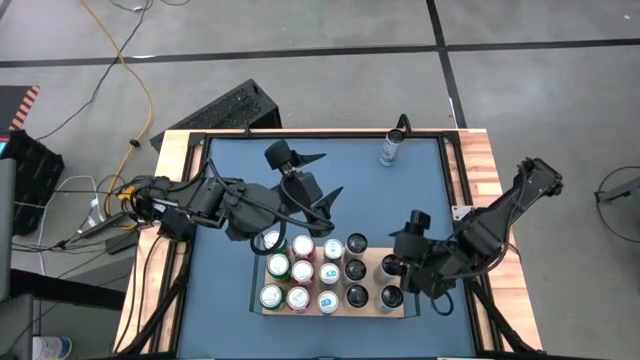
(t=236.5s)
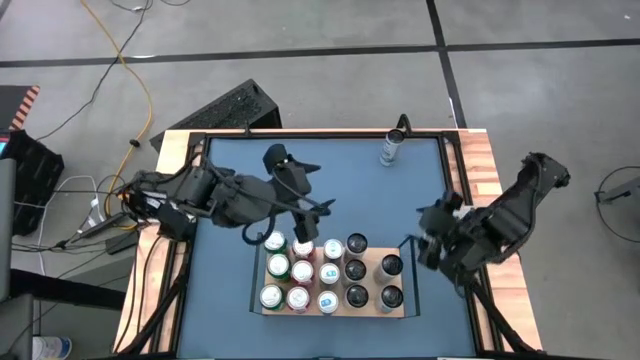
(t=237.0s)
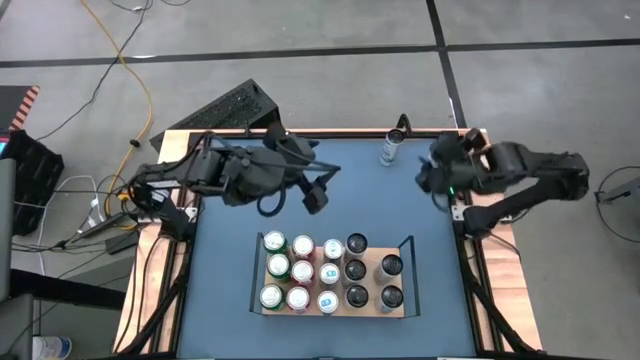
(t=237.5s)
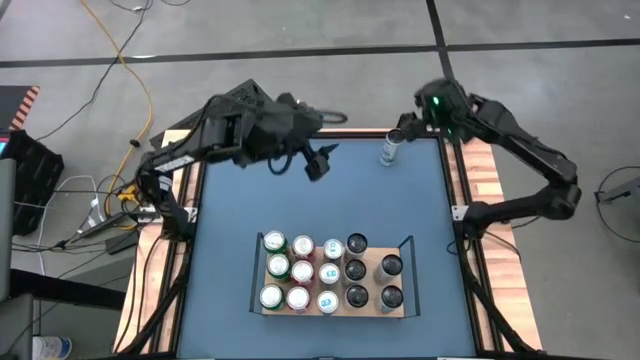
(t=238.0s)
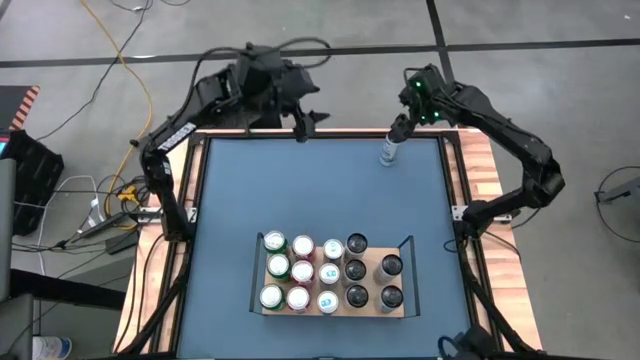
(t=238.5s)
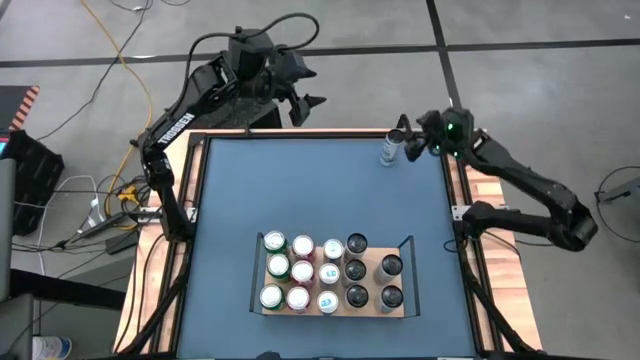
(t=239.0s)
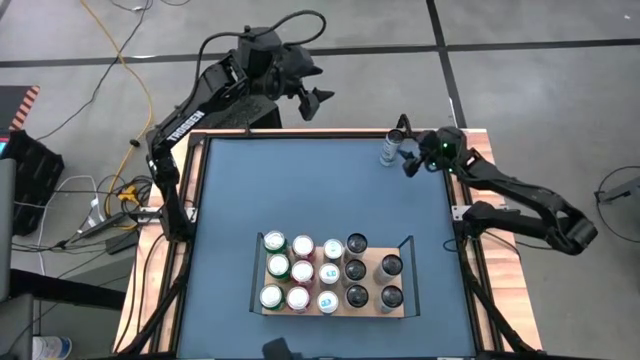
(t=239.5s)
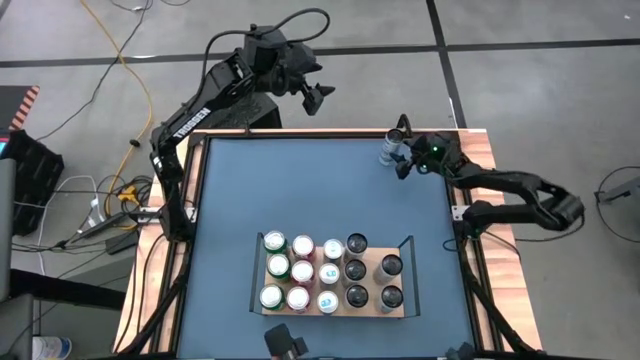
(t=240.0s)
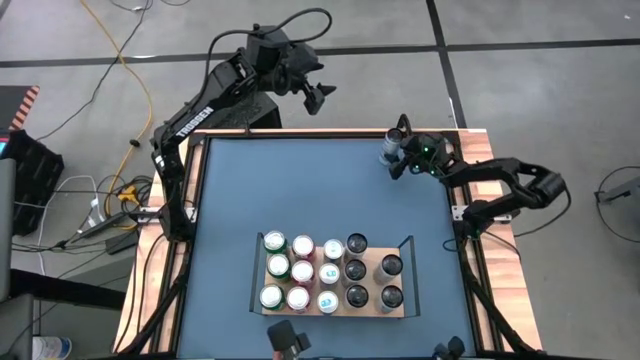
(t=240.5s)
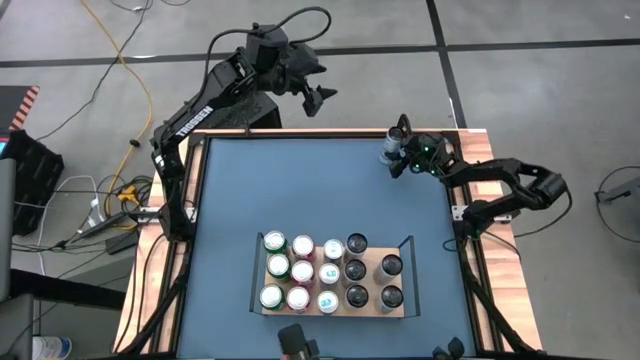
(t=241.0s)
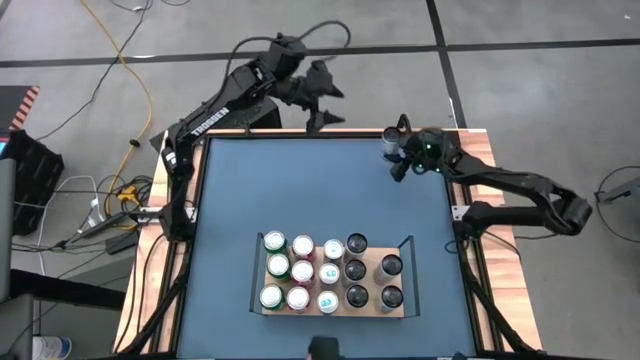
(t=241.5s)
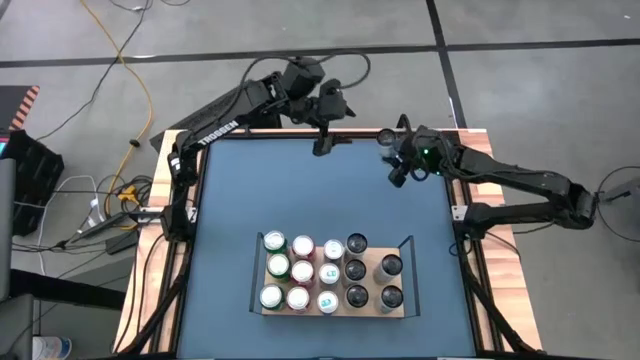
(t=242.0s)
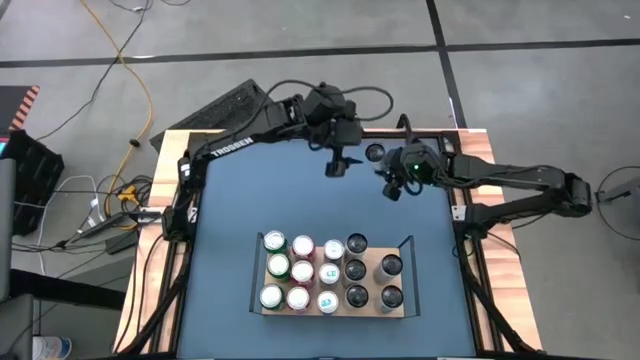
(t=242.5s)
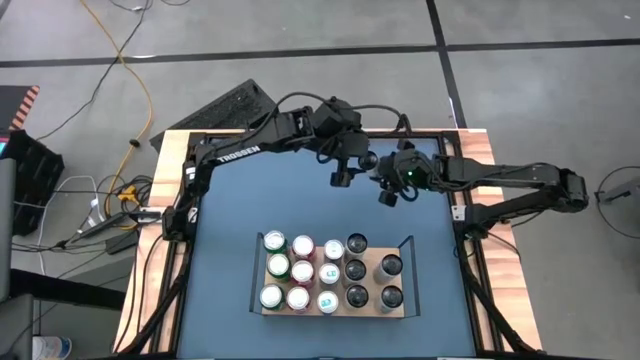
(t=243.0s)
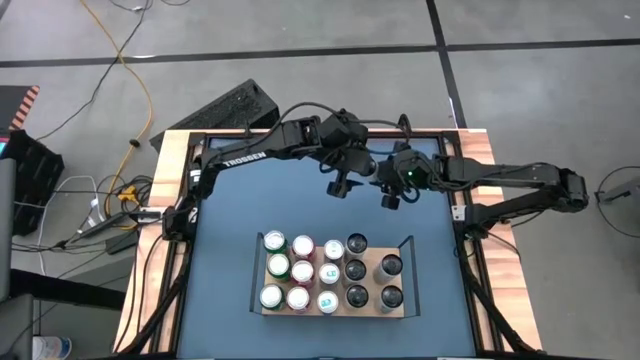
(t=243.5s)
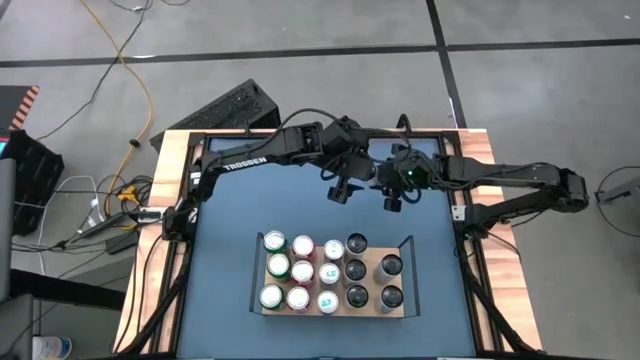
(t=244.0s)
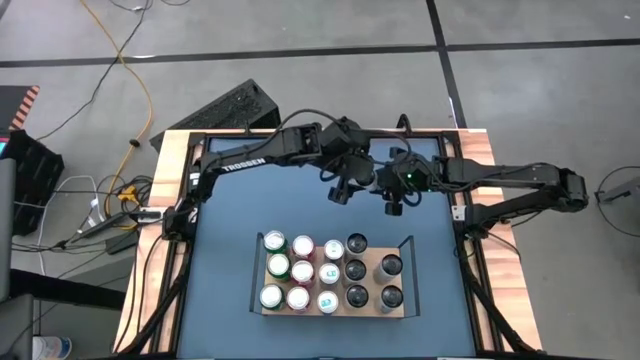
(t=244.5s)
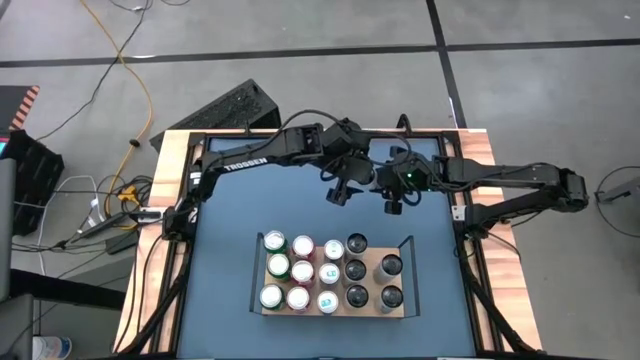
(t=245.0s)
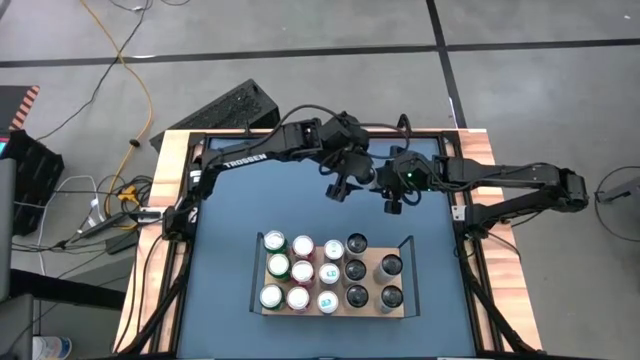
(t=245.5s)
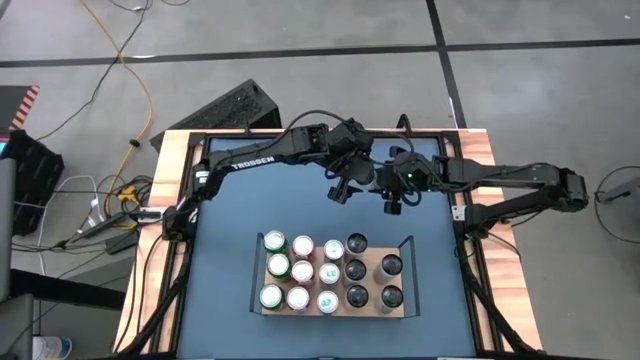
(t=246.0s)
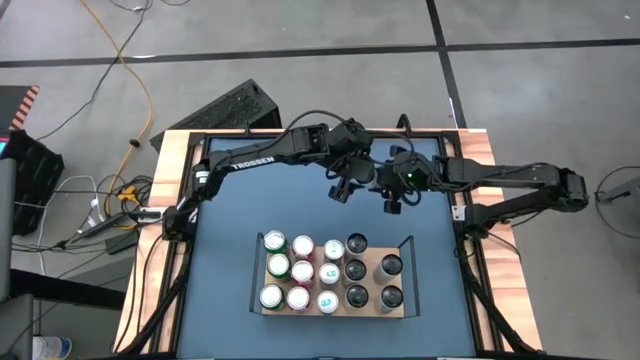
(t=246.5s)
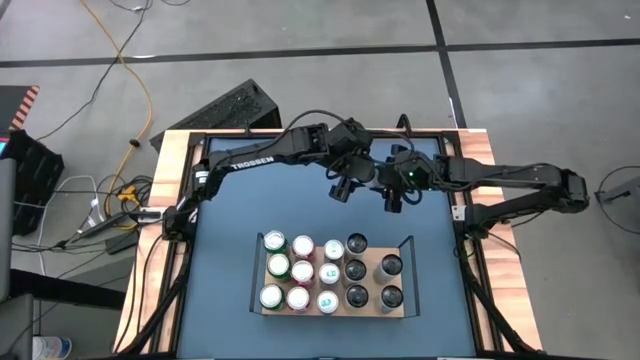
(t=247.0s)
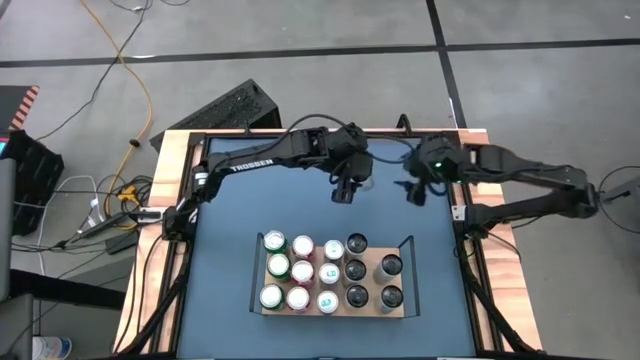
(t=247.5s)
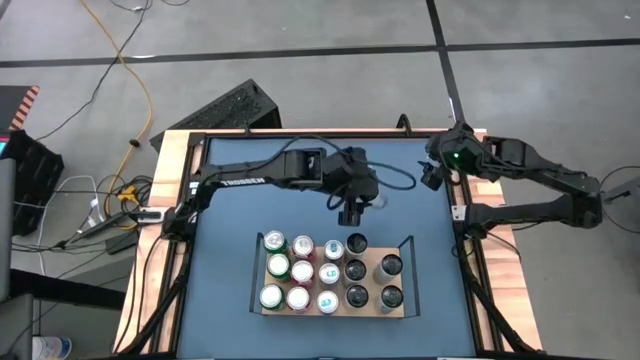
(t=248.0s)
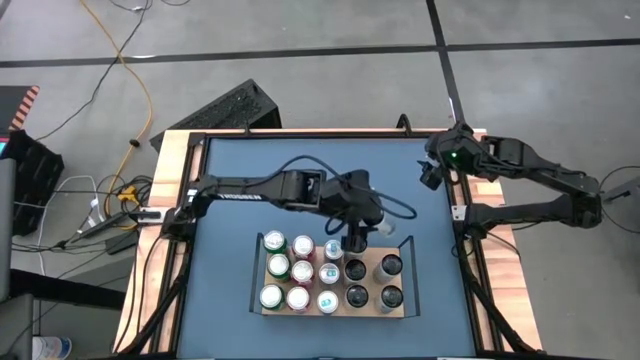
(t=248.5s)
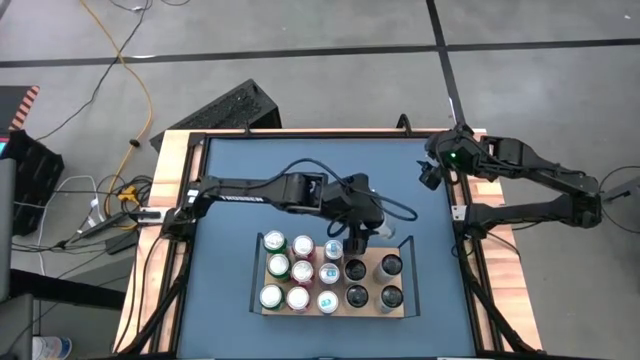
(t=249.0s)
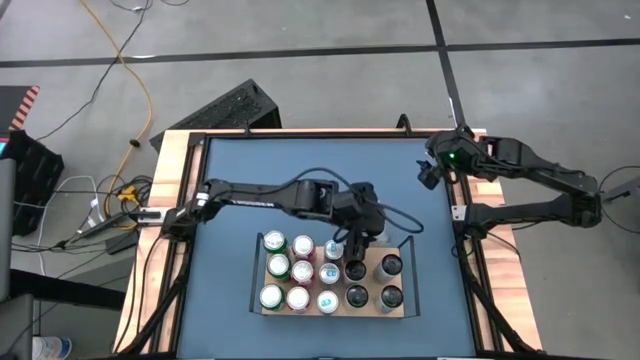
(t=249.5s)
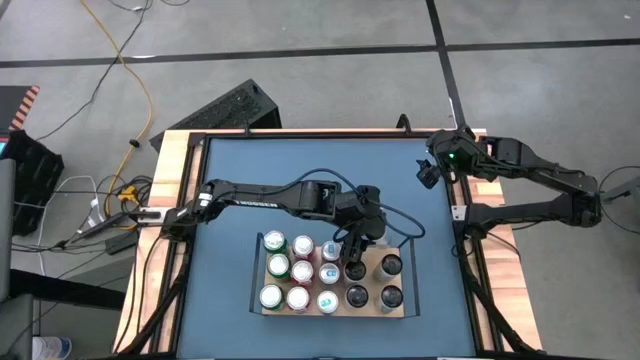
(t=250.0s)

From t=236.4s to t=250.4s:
Task: Place canned beverage on shelf
Put the white-blue soda can on the shelf aligned with the other white-blue soda cans

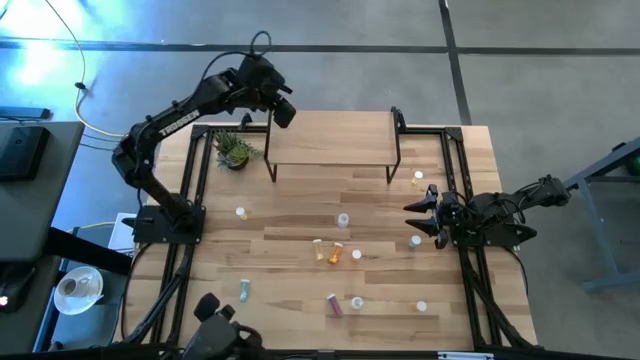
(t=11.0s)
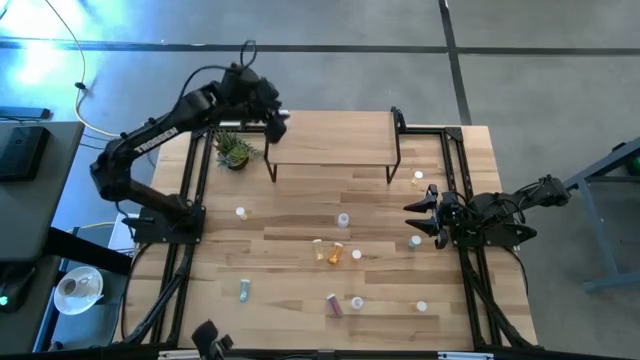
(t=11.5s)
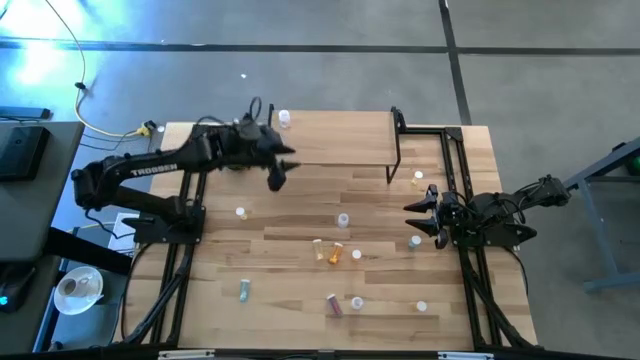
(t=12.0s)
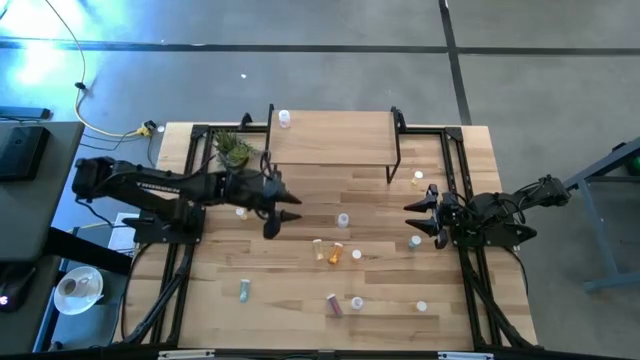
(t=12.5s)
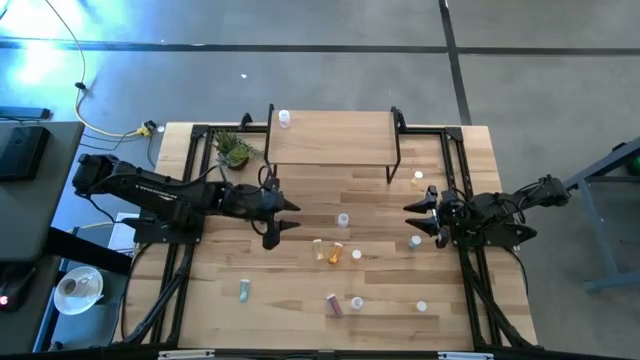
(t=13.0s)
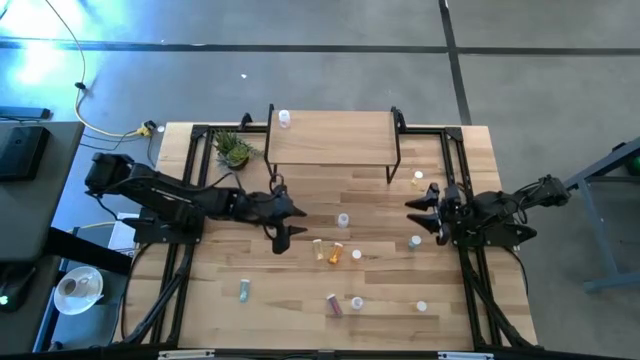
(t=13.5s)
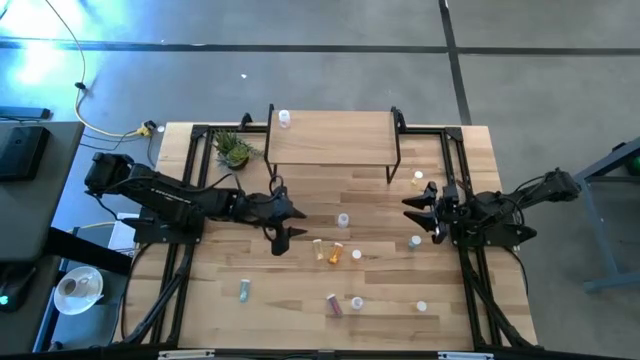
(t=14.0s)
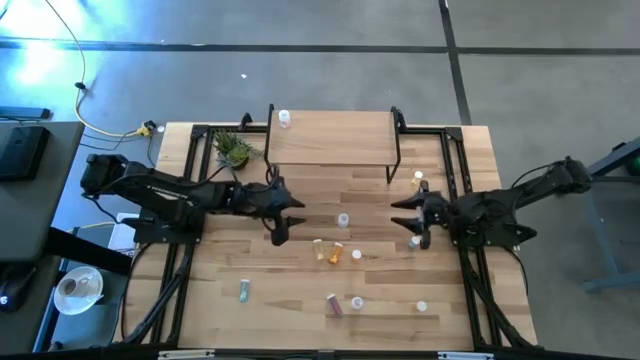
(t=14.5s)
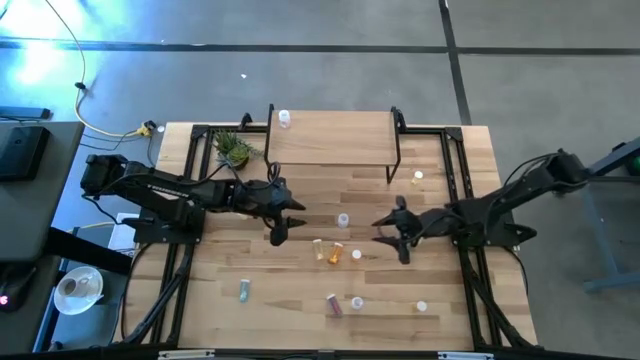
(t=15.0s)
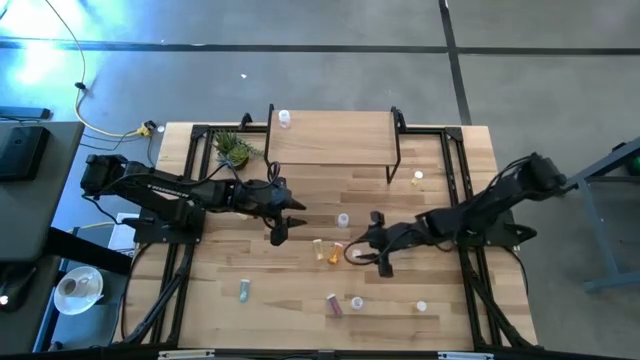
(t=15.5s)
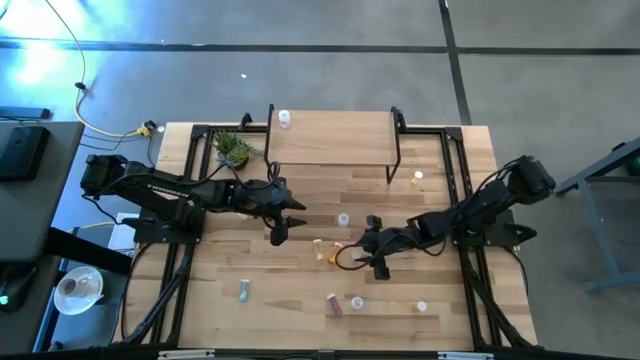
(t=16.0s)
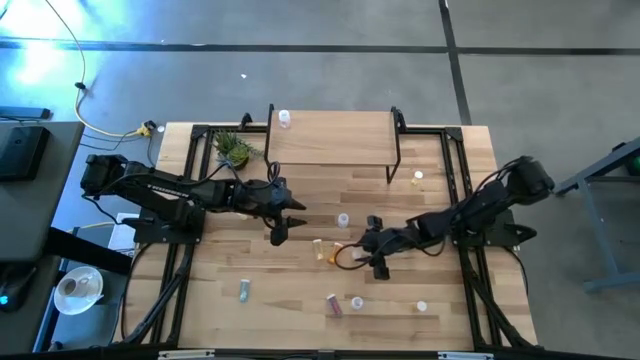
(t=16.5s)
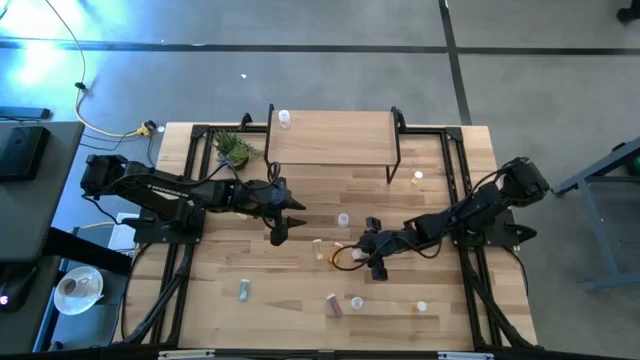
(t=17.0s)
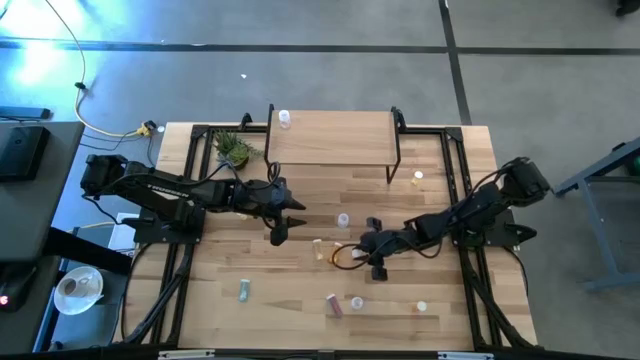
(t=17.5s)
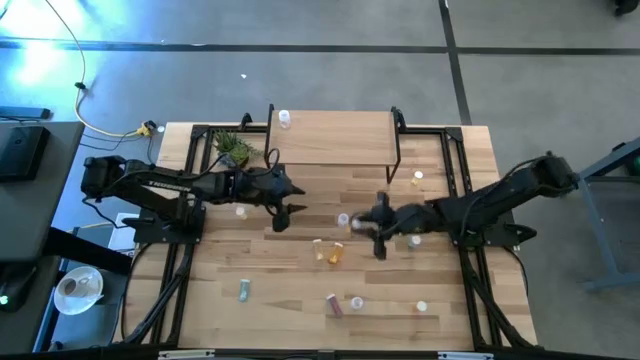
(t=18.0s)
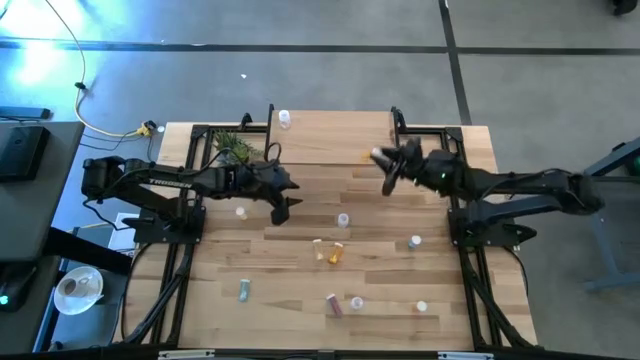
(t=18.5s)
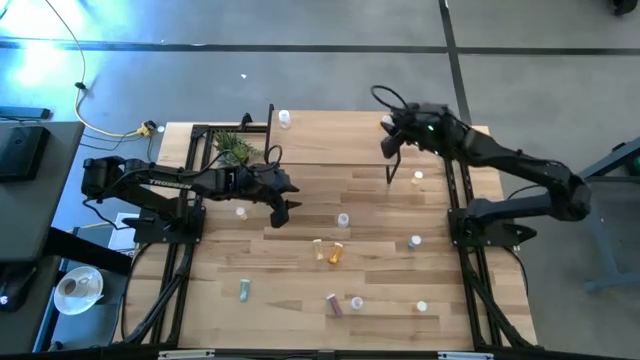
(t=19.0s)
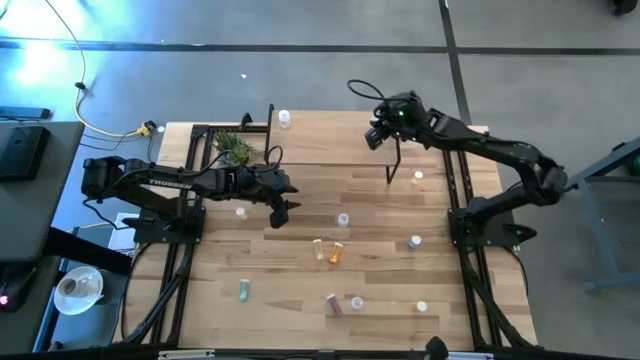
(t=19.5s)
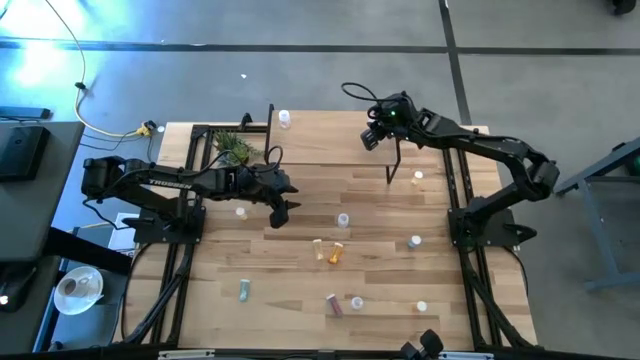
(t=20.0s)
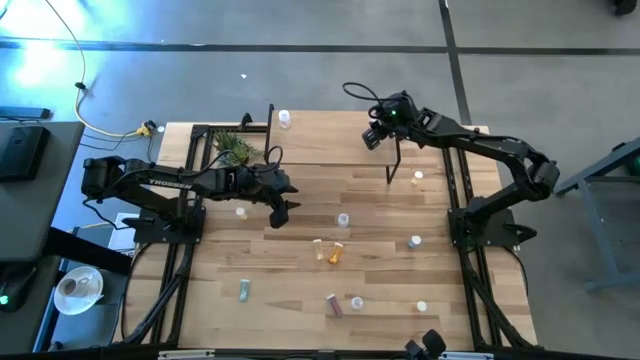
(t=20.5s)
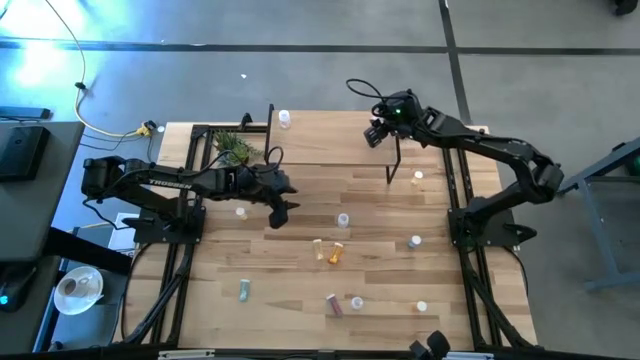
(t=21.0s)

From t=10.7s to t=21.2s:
Task: Pick and place medicine bottles onto shelf by color
Put the orange pill bottle on the shelf
